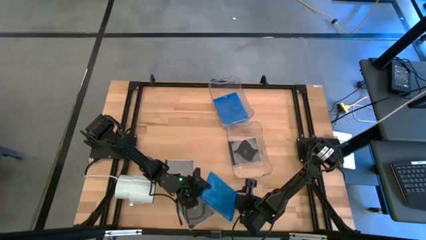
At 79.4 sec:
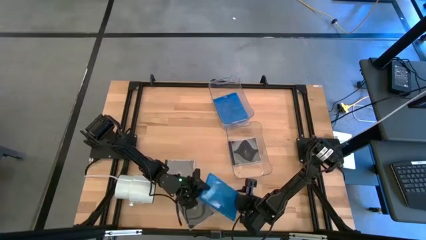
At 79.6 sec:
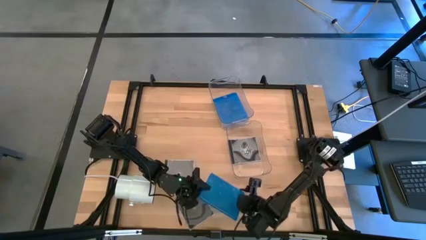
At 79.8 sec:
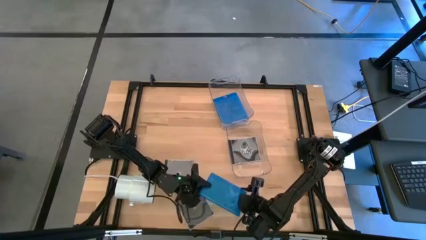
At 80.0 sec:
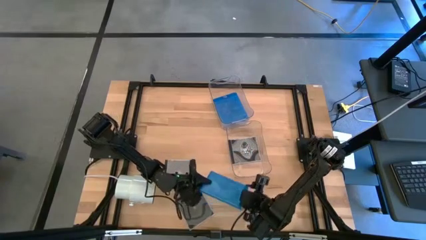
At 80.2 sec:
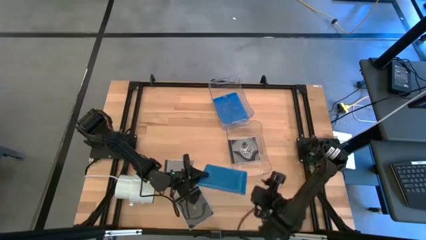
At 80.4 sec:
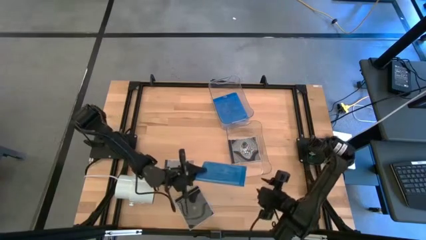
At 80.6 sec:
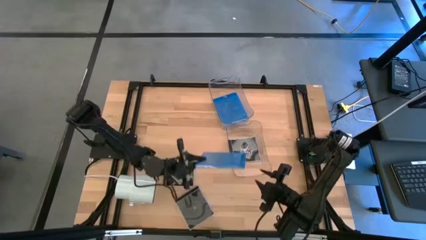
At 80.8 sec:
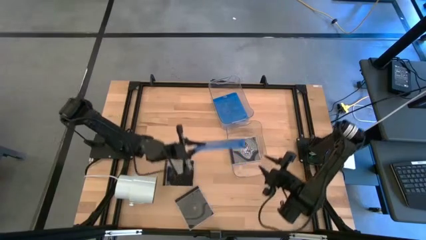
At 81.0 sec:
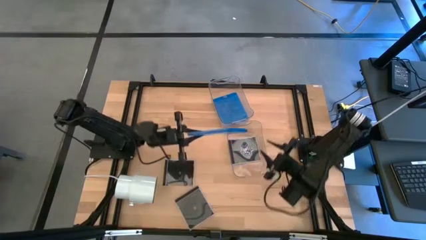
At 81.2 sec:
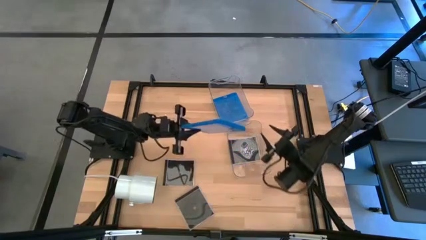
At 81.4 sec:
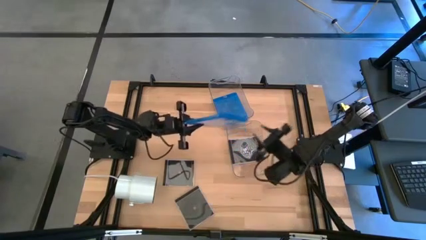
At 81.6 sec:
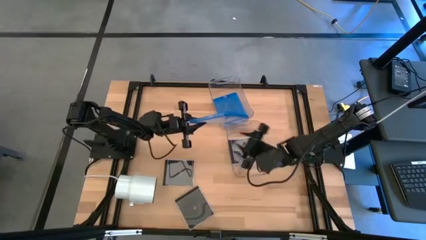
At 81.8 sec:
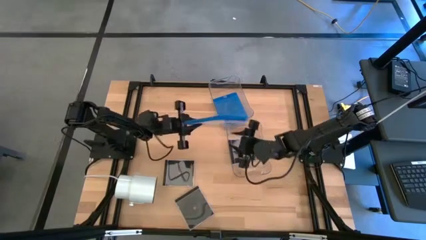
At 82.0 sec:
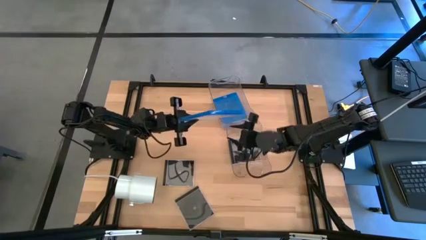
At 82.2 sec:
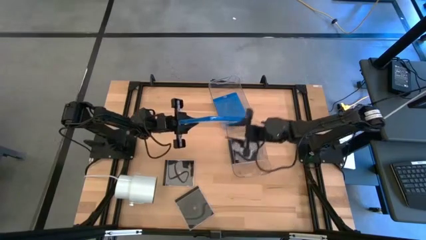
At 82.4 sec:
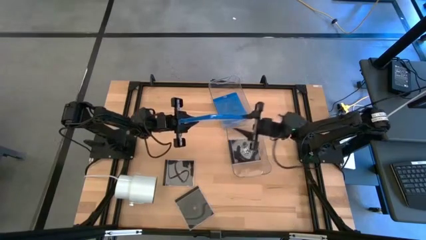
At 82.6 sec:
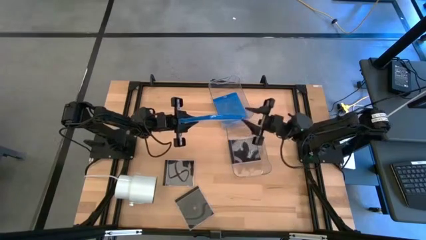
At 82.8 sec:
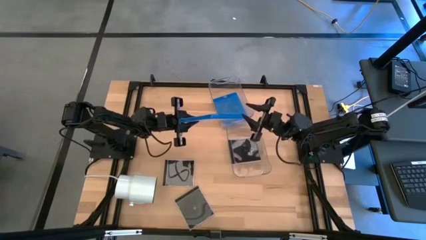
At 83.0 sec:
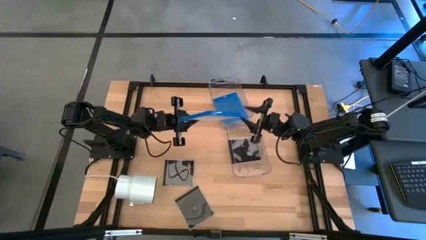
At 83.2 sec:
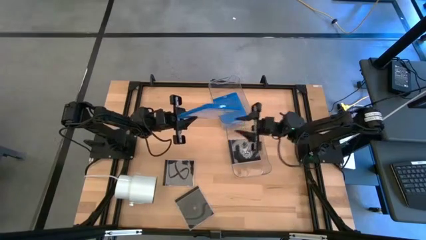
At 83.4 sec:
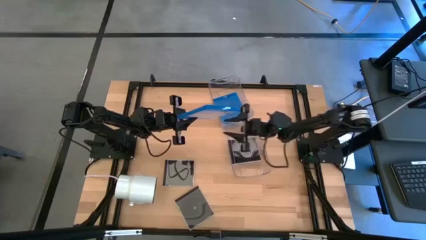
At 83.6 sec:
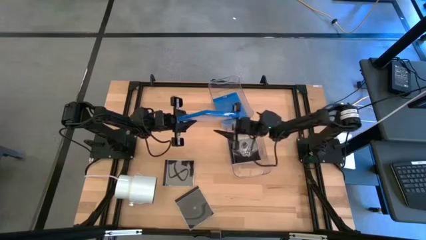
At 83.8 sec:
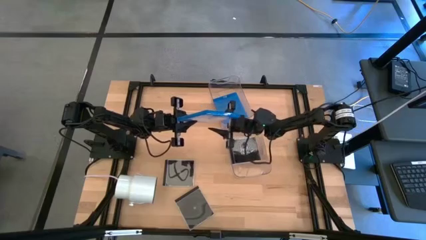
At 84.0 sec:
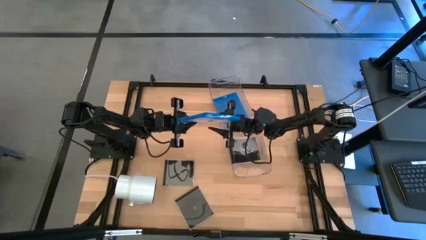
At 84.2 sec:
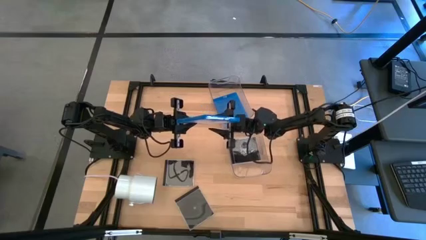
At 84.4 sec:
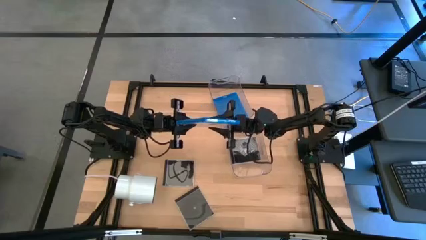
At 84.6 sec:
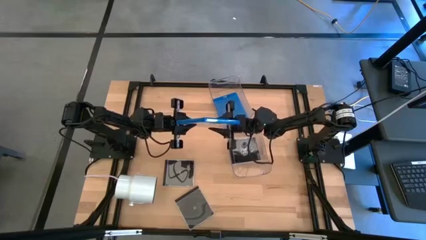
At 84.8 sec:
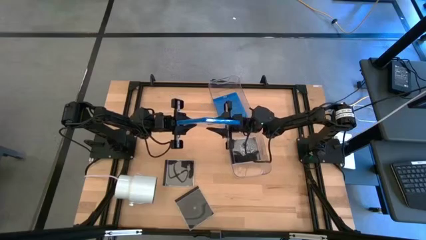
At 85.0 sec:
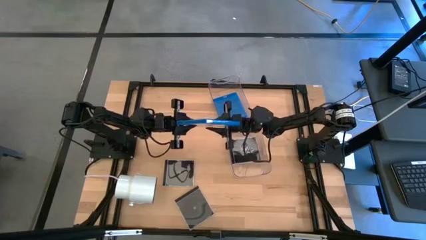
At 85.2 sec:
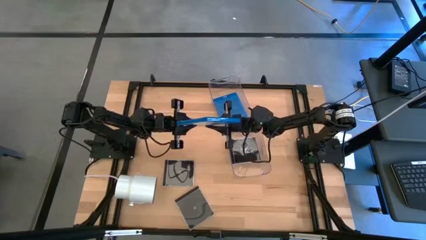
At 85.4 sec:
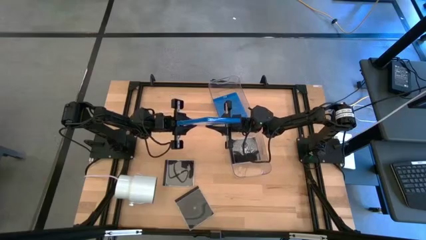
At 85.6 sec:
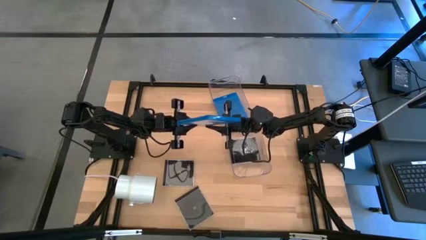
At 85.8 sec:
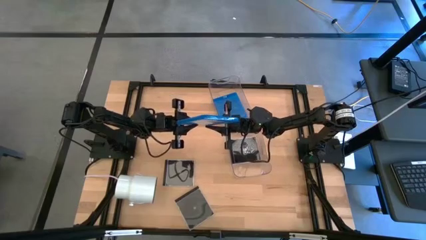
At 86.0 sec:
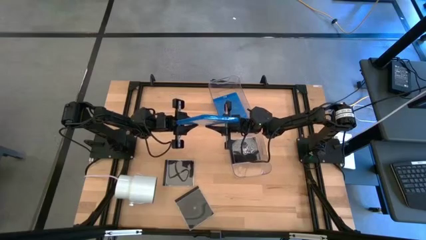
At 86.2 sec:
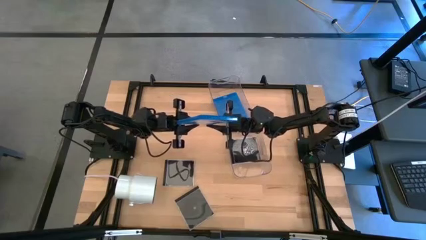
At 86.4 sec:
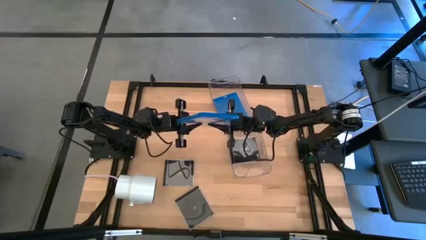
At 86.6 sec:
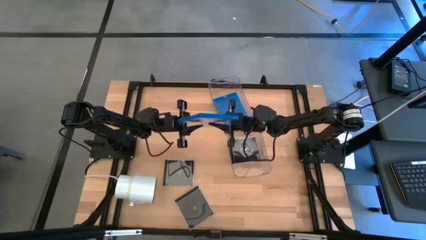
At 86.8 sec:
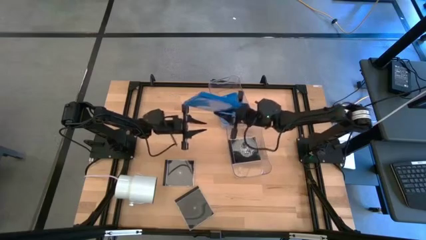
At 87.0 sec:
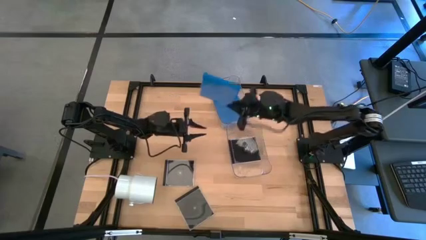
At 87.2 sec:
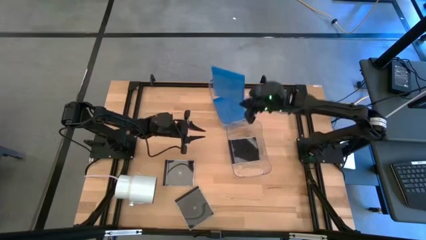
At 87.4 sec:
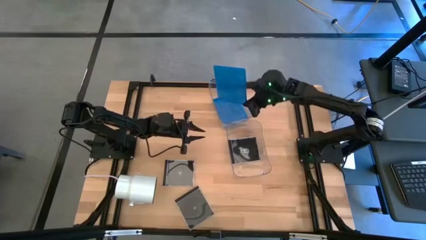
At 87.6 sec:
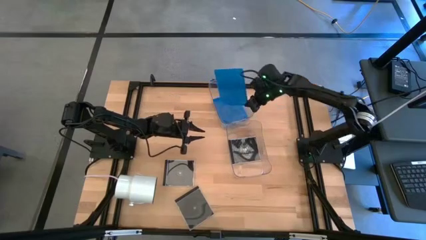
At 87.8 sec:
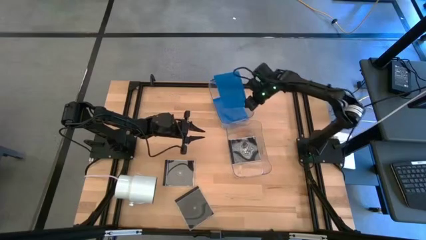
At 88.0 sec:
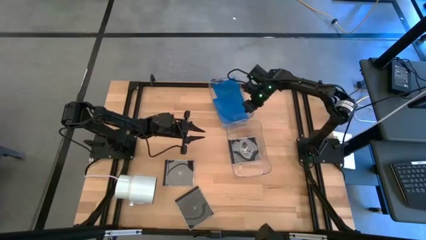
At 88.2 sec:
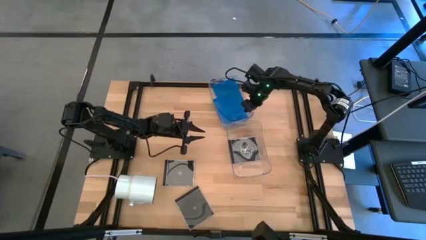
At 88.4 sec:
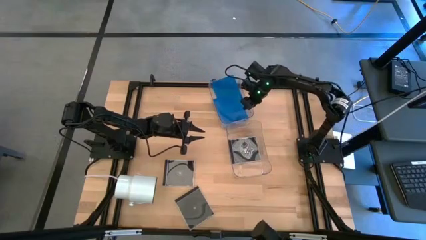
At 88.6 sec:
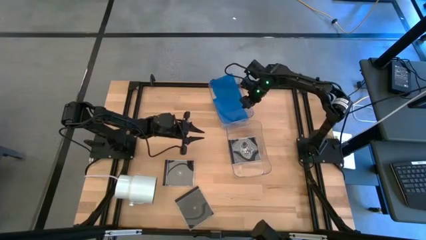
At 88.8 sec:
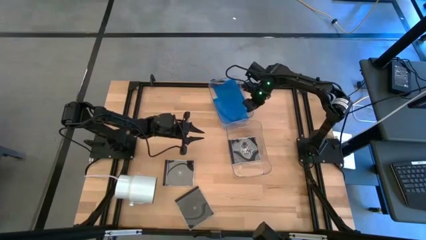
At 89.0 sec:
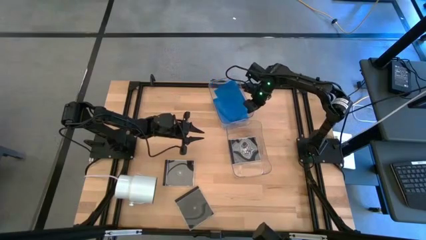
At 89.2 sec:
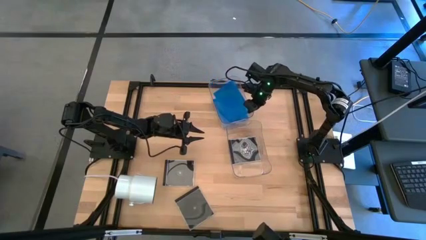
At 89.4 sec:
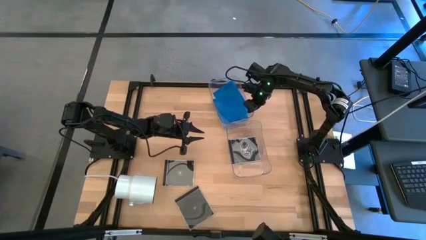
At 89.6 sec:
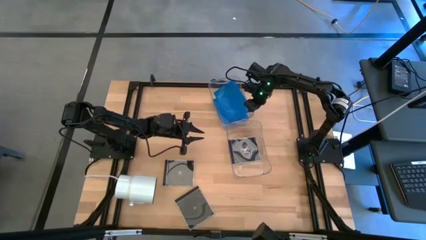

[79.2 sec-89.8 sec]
Task: Pick & place jewel cases by type
Put the blue CD case into the top transparent bin

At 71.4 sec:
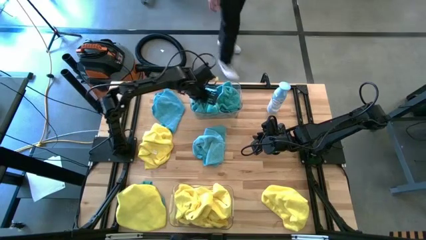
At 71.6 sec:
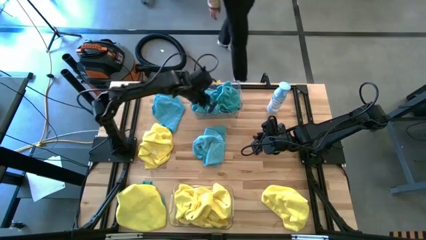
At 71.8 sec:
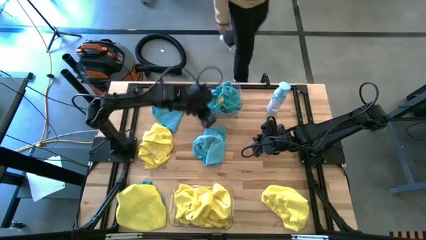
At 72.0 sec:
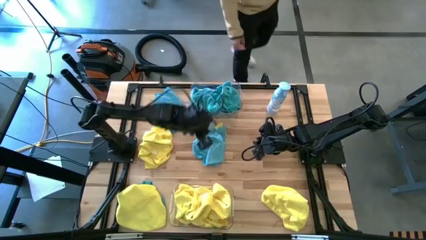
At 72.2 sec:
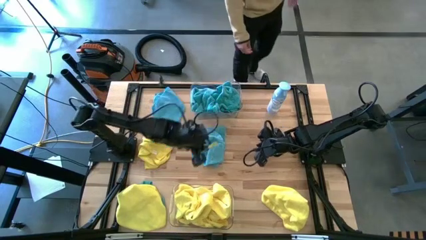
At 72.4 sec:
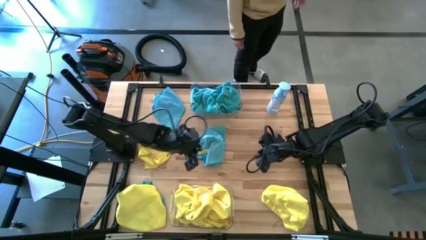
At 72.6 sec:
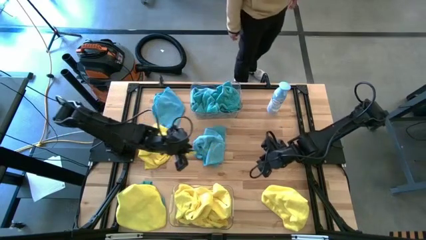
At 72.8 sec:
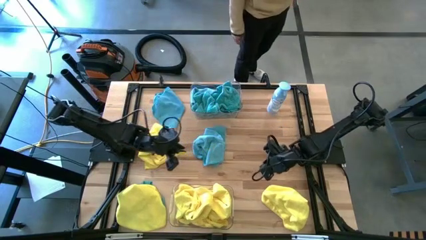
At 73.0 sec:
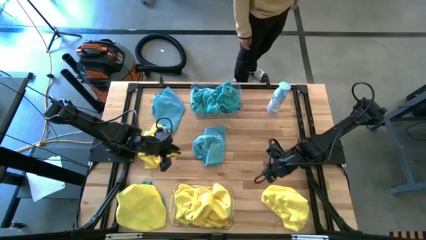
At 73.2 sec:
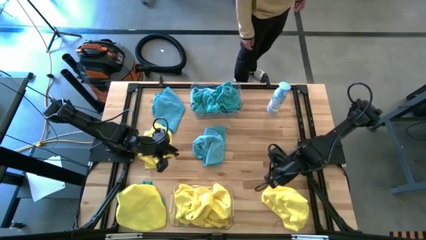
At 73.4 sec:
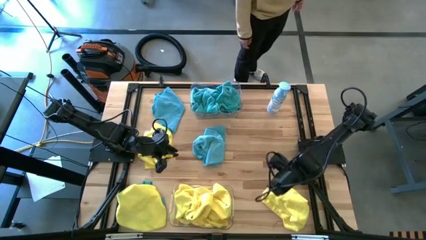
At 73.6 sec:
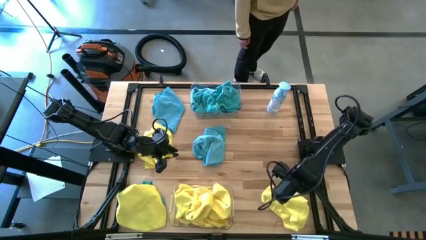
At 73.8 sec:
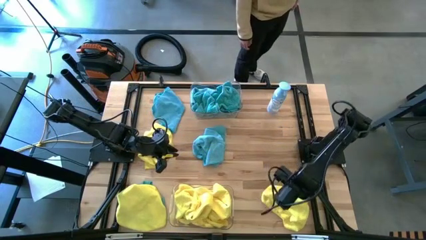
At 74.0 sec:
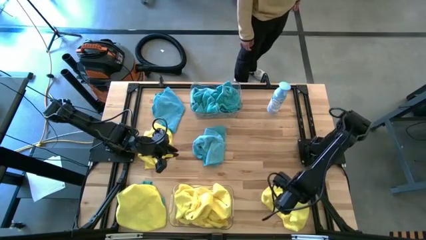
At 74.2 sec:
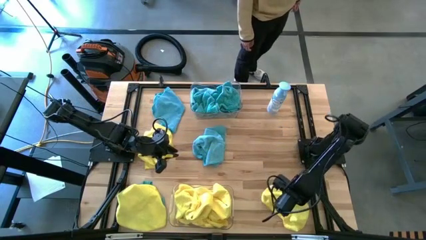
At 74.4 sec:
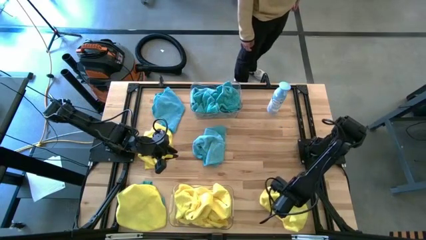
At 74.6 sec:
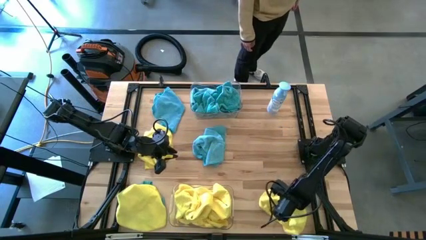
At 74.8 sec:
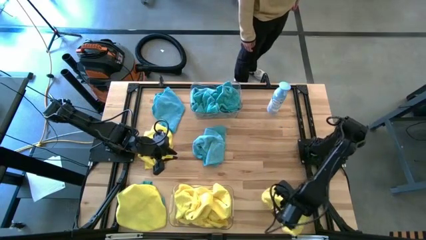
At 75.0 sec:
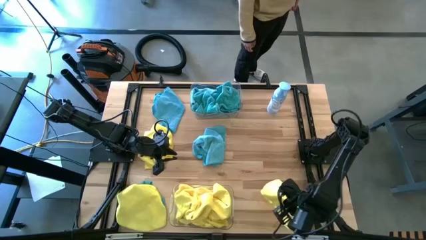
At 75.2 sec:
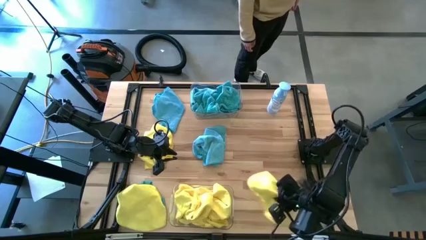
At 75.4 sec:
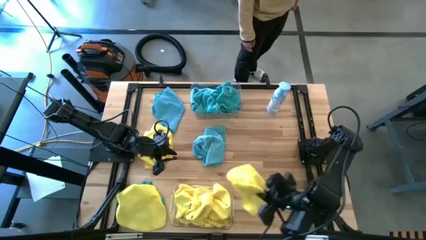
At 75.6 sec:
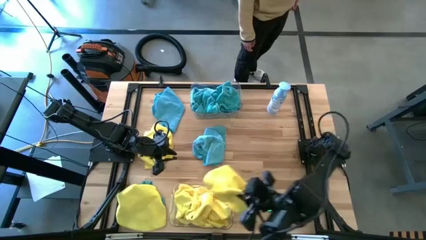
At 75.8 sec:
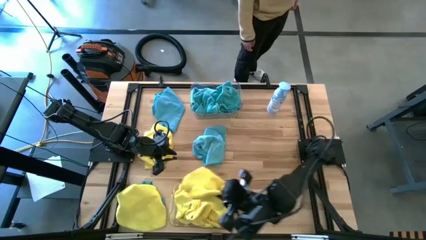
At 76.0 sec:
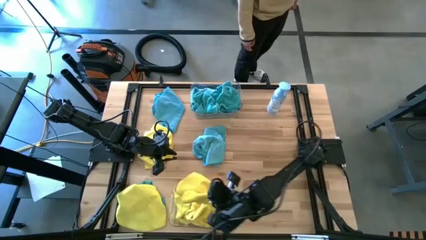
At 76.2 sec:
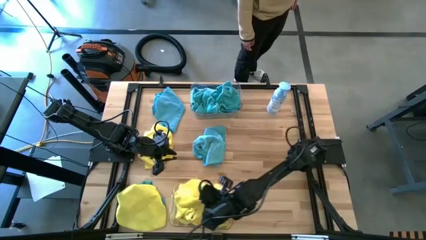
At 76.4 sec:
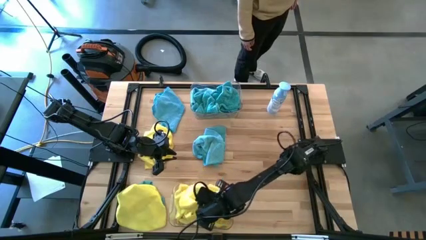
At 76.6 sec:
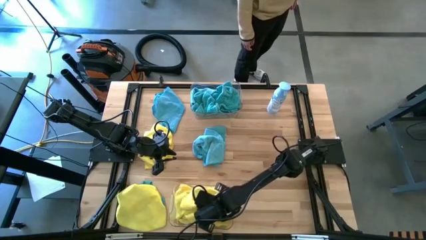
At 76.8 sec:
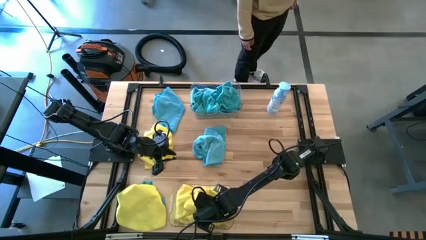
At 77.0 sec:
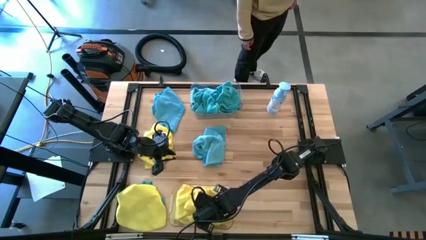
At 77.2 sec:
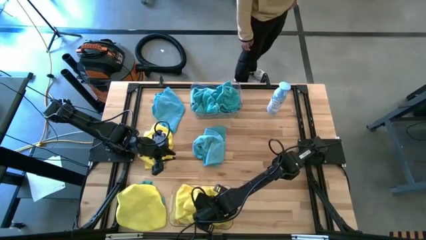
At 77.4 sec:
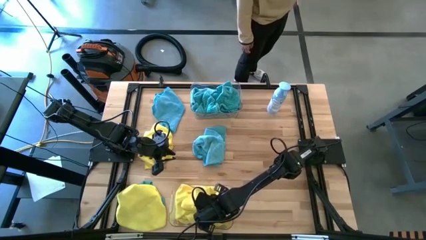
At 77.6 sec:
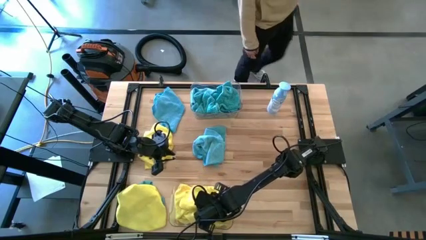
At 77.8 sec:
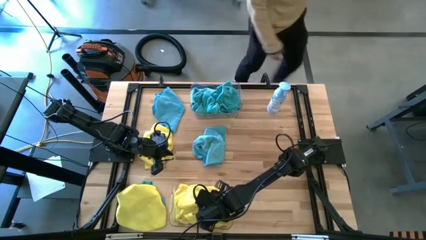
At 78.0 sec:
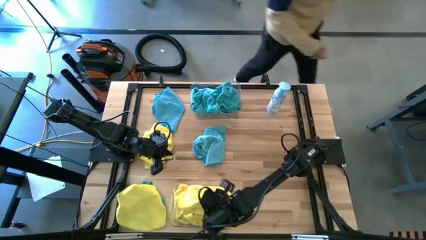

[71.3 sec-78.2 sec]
Task: Sort microfiber towel by color & place in baskets
Put the yellow microfiber towel into the bottom transparent bin
